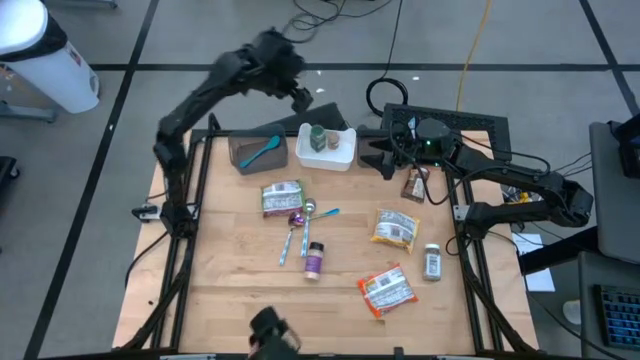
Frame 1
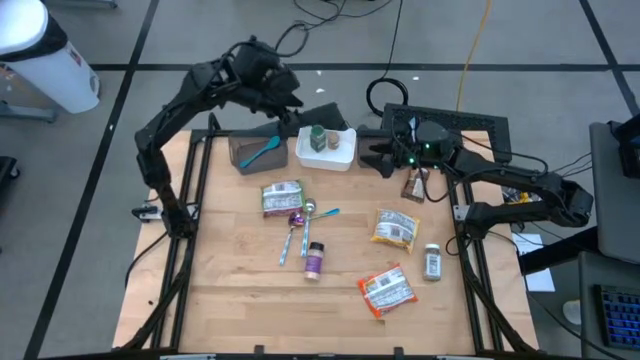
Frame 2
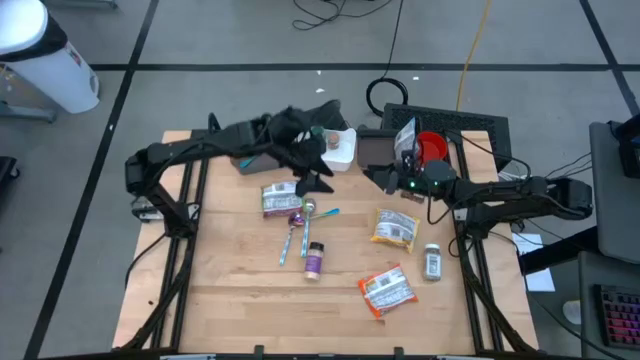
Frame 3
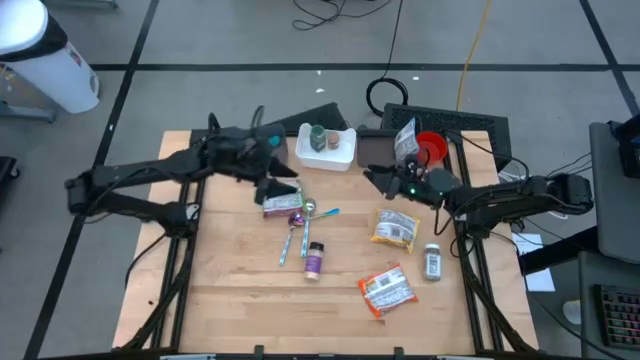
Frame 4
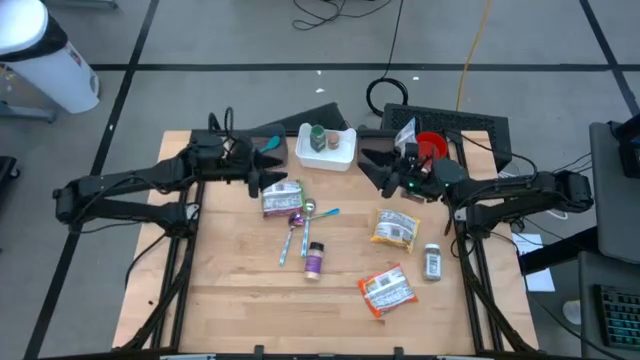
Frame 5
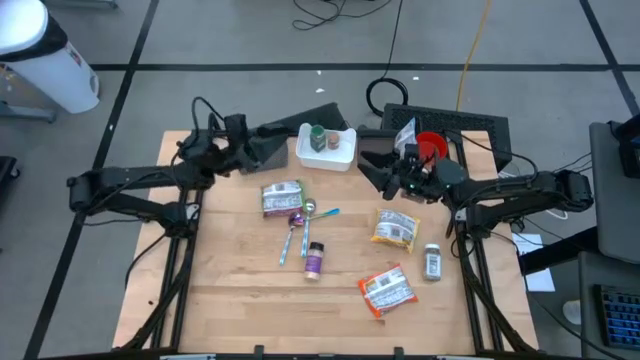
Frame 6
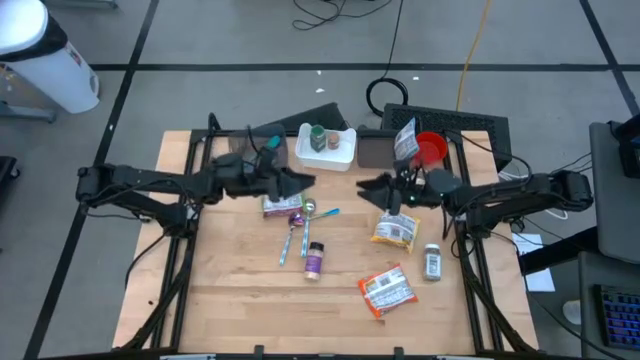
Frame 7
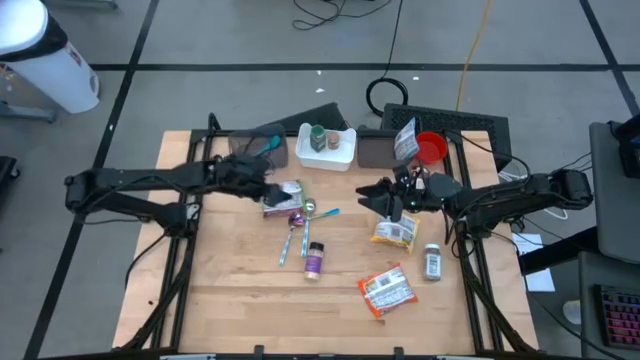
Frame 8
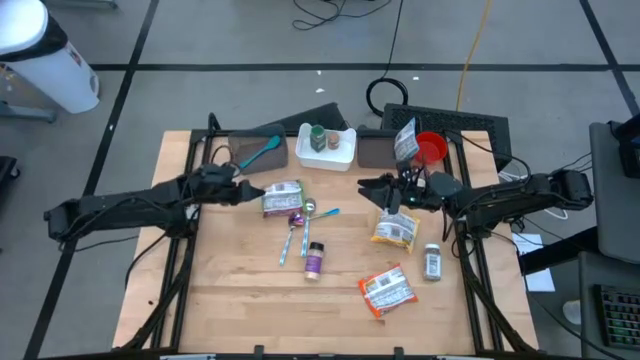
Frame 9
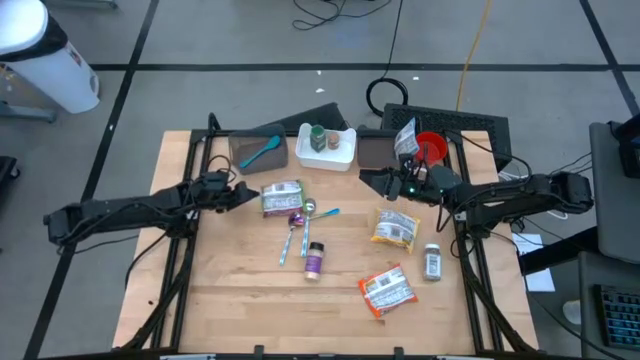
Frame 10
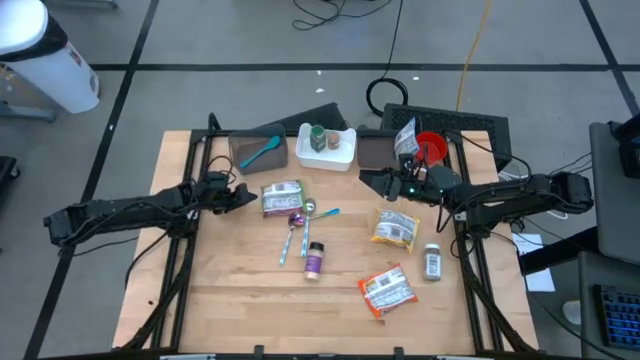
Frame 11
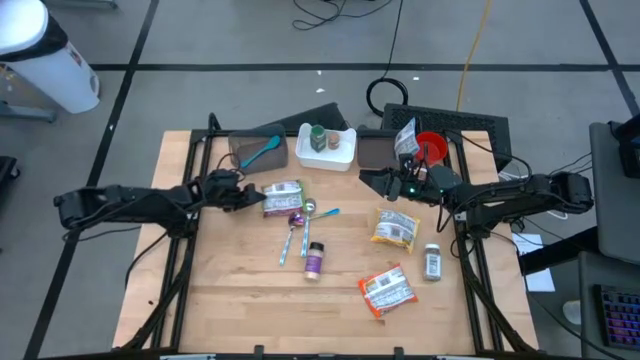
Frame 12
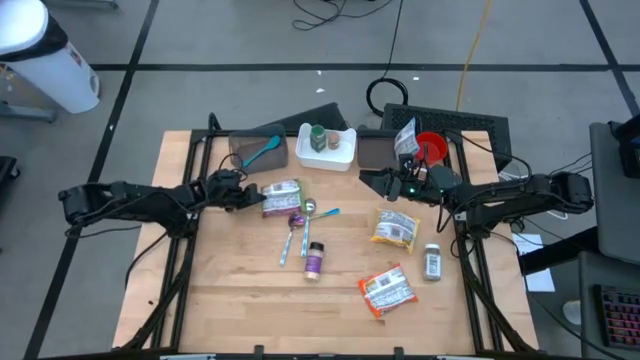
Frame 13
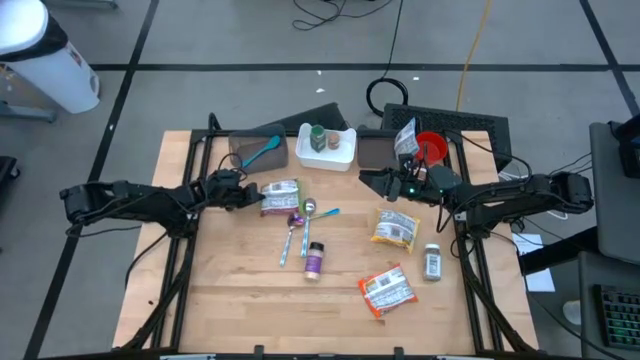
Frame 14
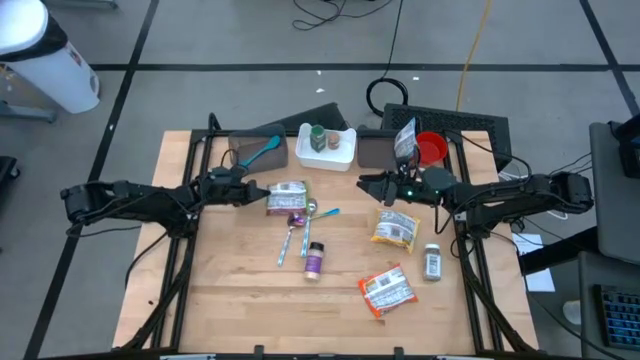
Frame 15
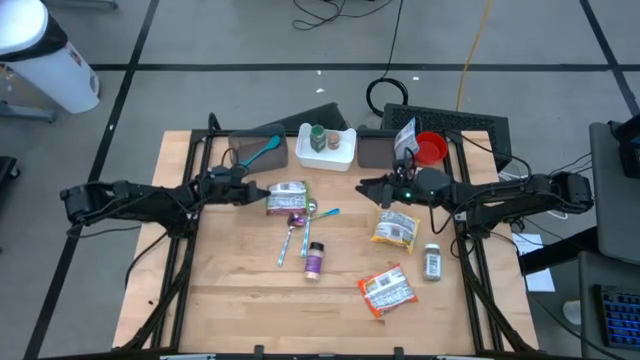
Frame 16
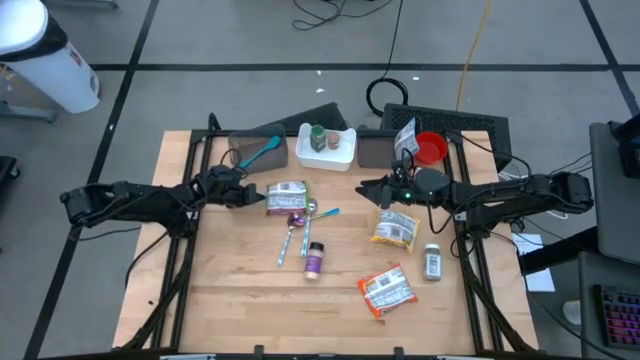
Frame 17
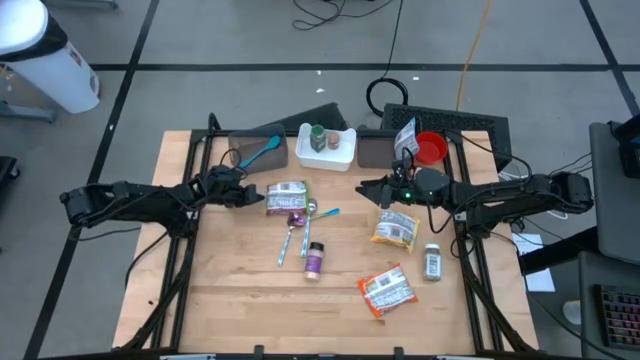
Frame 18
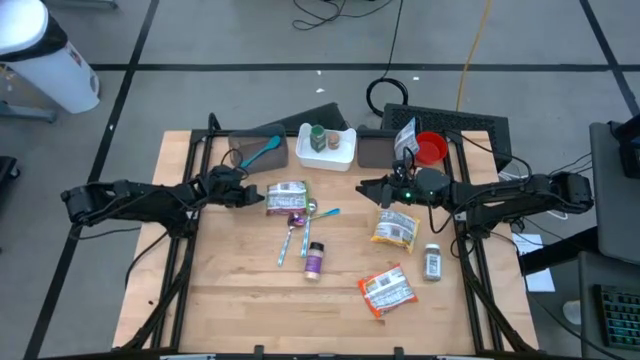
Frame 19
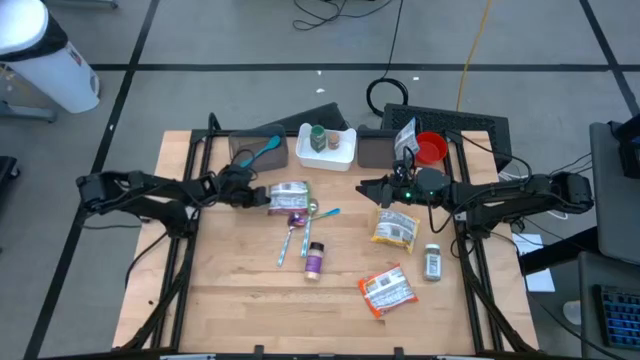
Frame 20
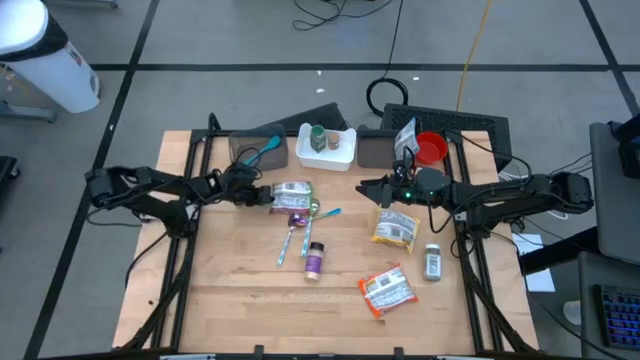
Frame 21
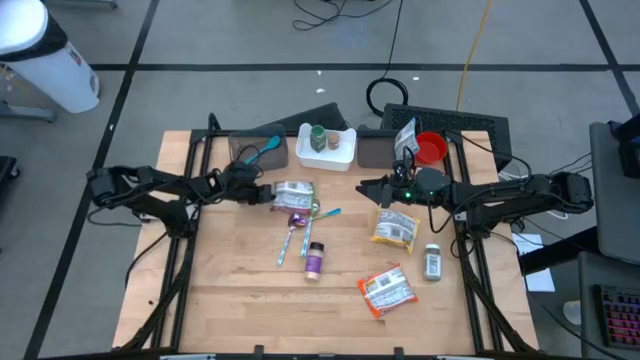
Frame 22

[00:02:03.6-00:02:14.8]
Task: Pick & Place Food Item
Put the green noodle pack into the right black bin

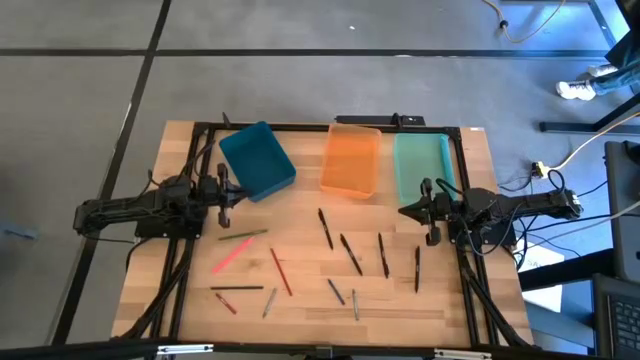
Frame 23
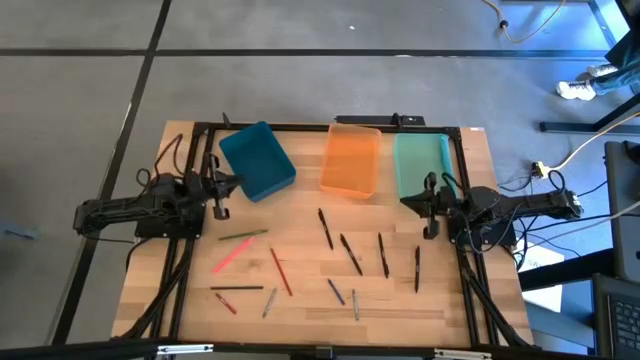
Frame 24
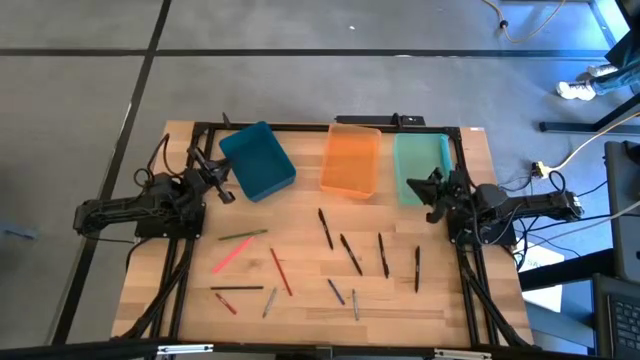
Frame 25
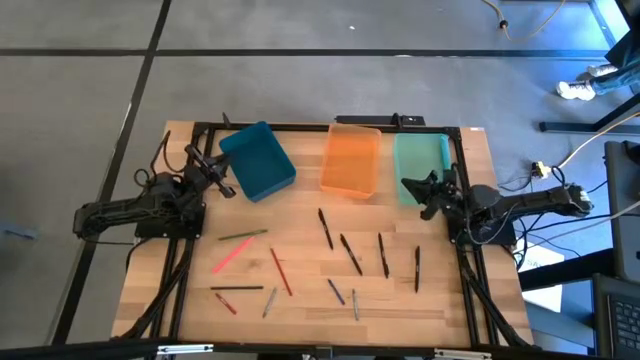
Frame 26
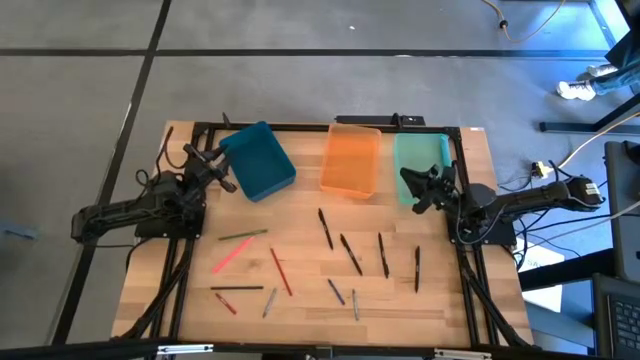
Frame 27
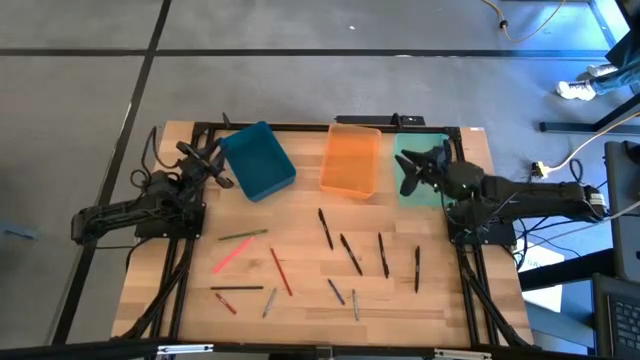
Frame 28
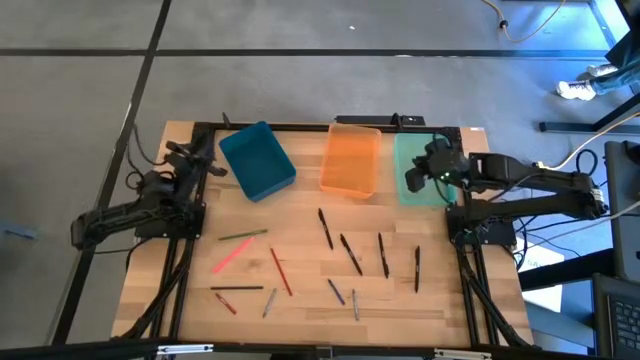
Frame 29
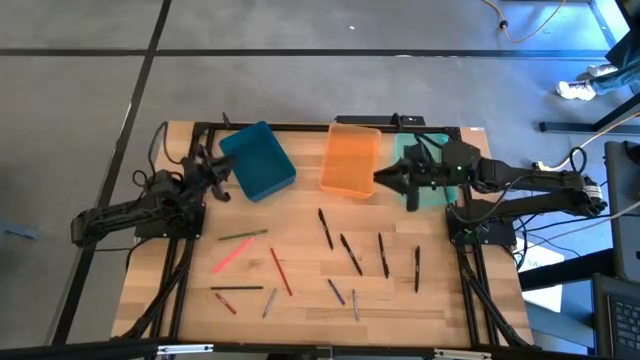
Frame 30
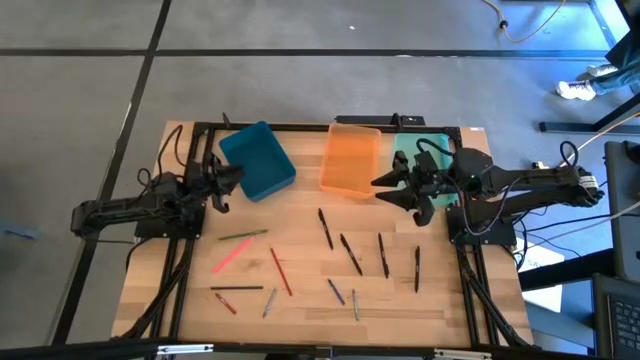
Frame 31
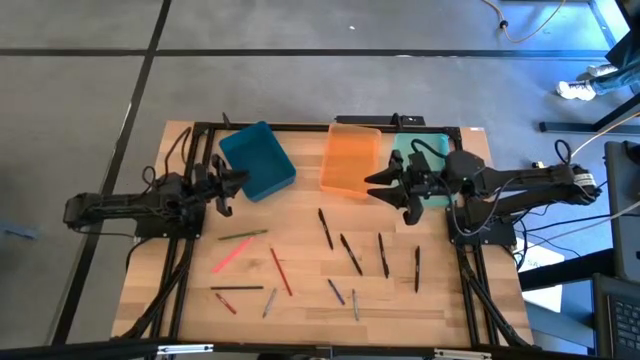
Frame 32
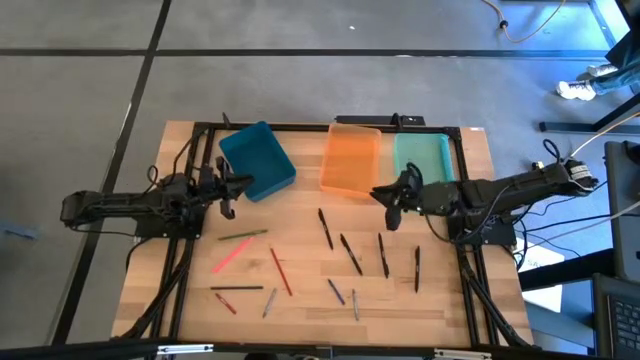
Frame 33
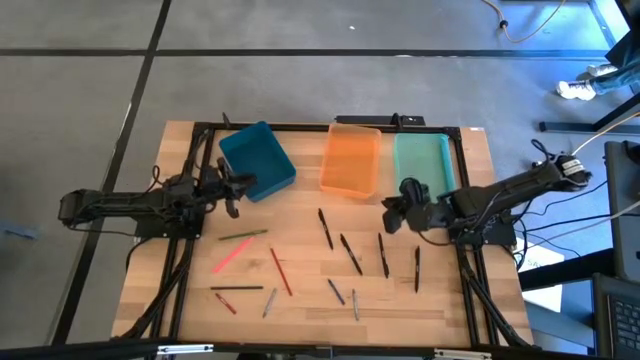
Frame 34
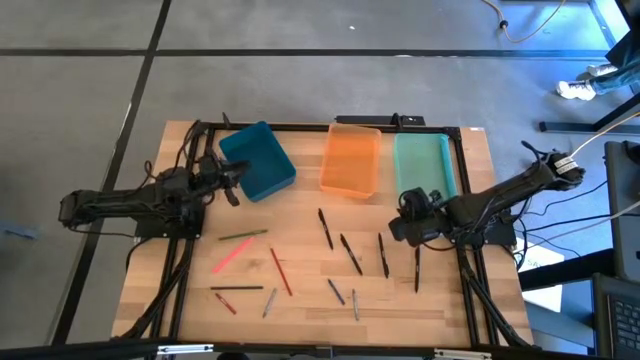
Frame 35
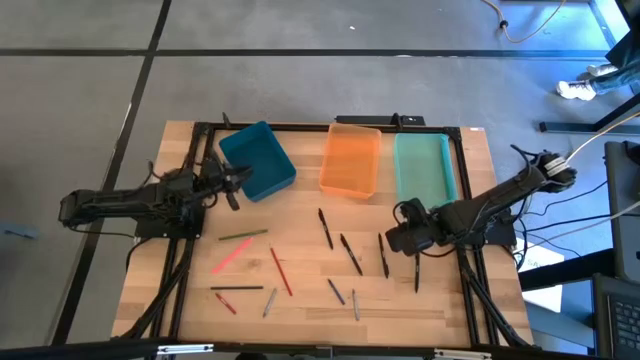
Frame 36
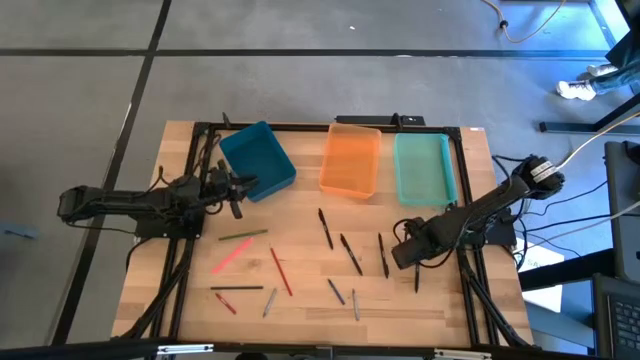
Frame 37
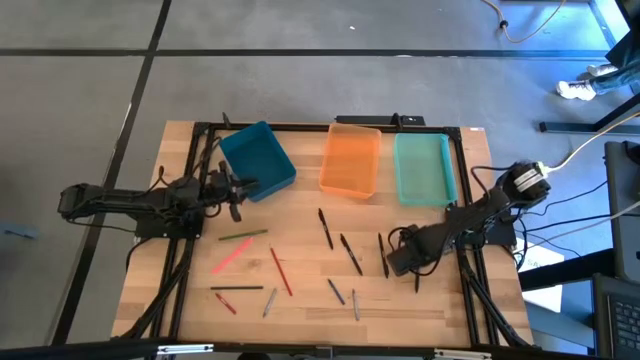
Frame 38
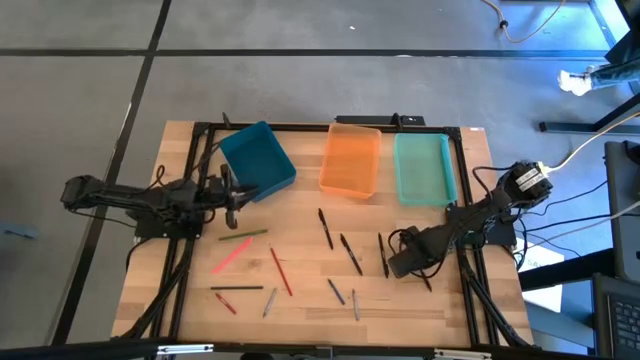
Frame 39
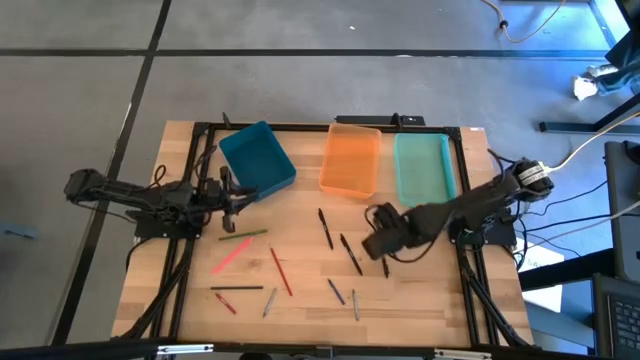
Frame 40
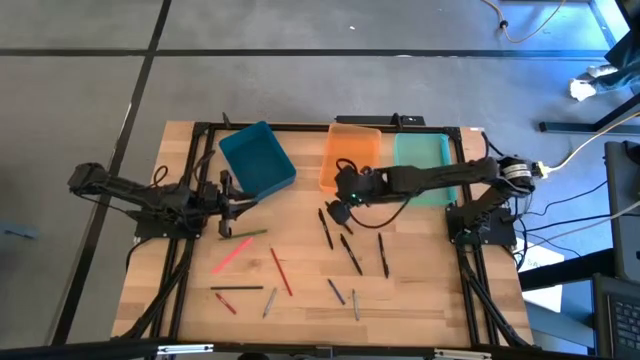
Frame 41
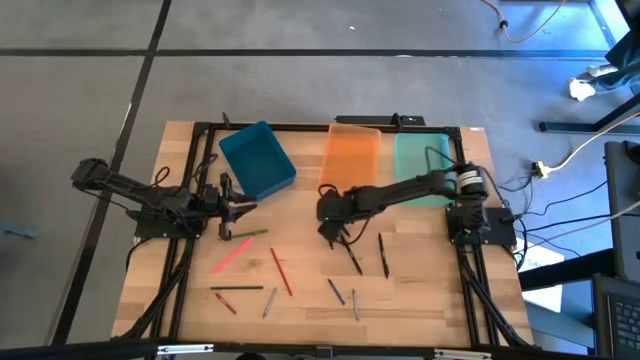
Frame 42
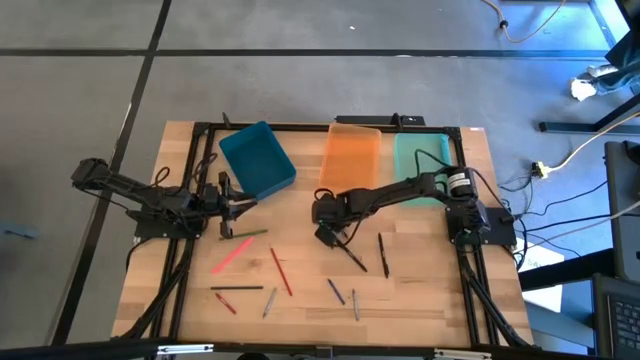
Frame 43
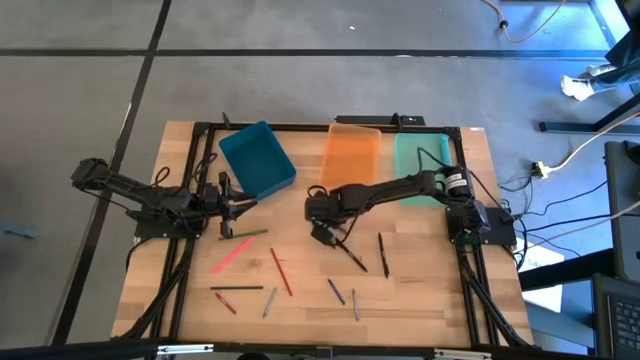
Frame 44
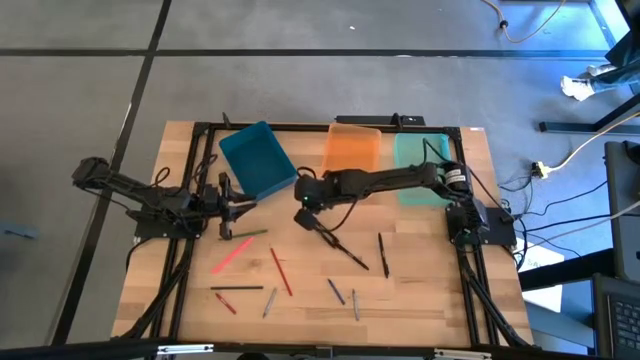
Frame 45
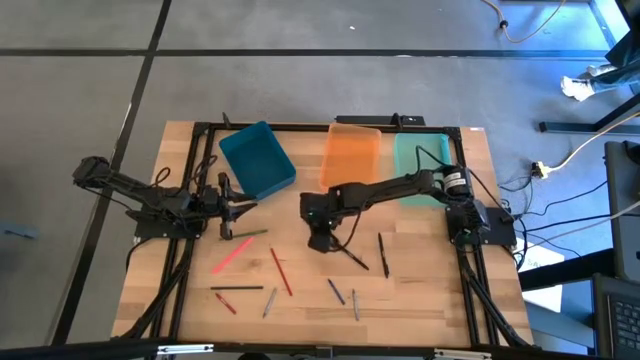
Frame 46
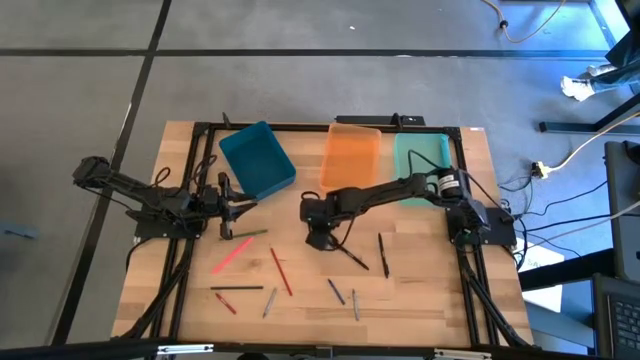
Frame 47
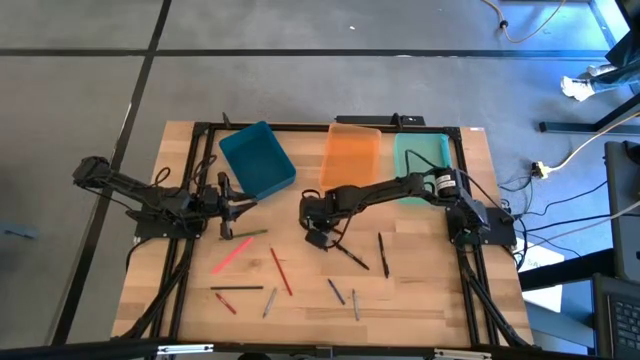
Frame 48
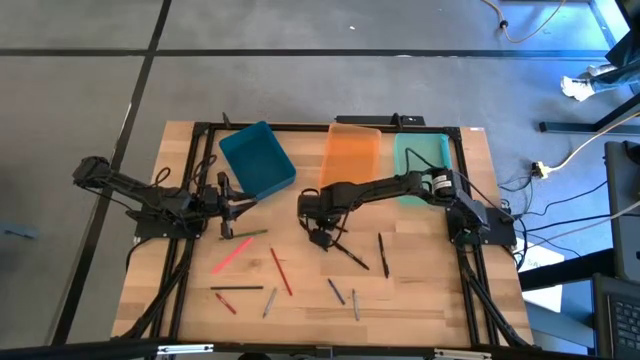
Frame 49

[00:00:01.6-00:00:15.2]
Task: Sort crayons/erasers/pens/pencils in bins
Put the right black pen into the blue bin
